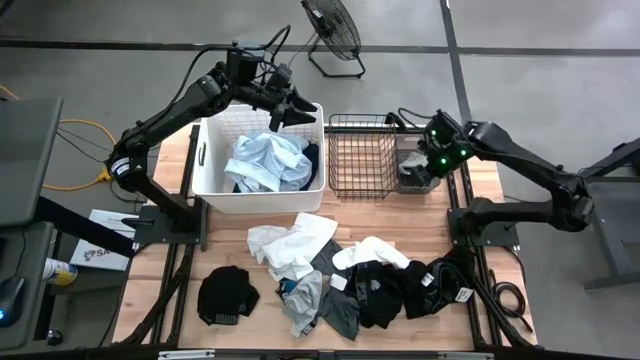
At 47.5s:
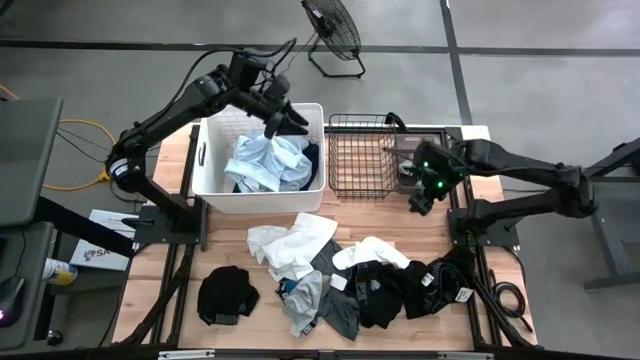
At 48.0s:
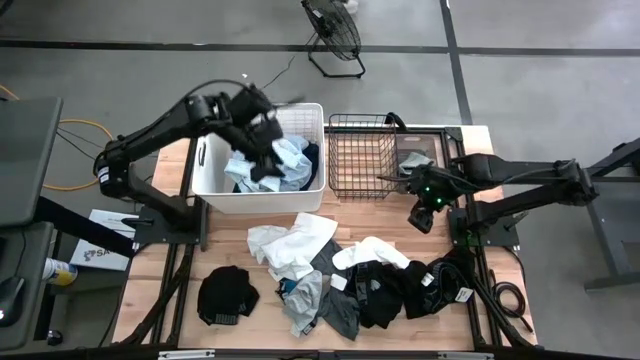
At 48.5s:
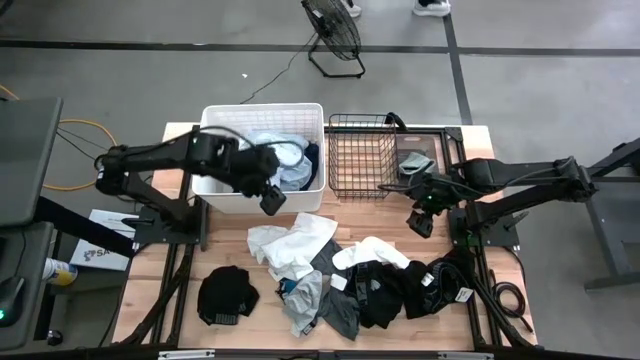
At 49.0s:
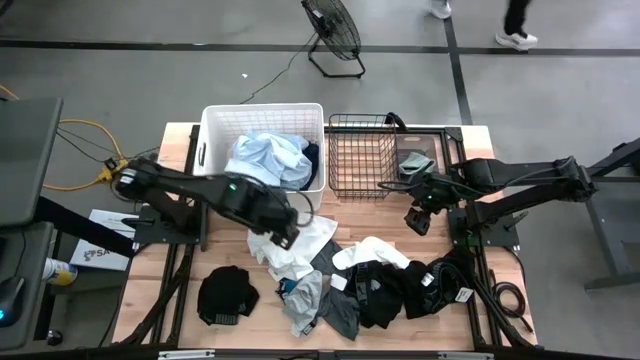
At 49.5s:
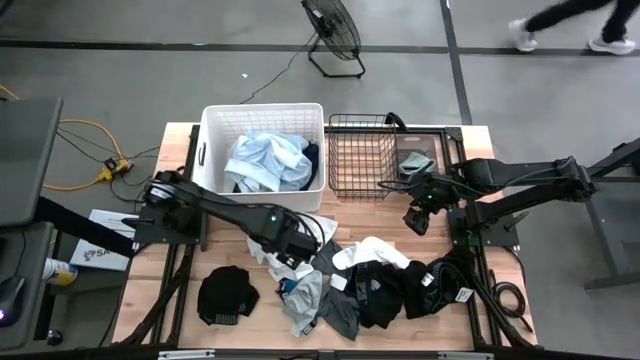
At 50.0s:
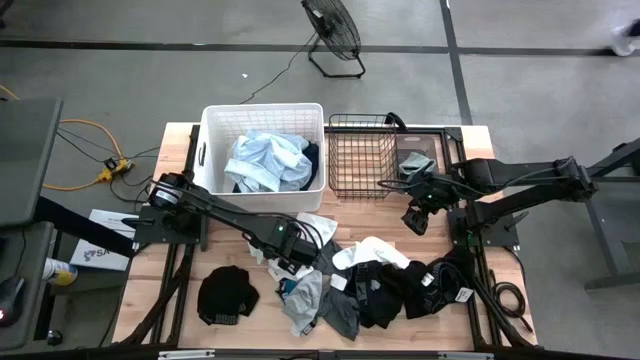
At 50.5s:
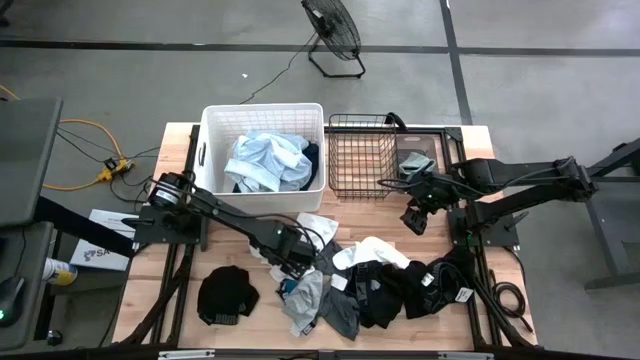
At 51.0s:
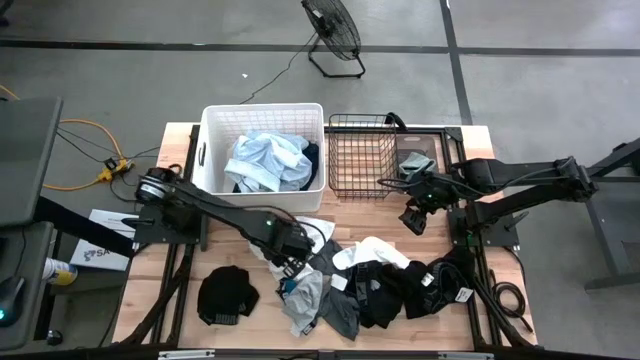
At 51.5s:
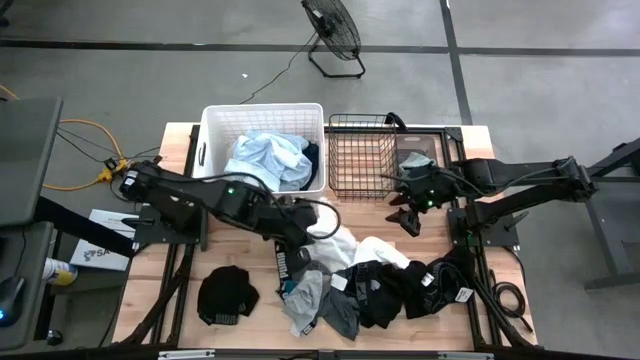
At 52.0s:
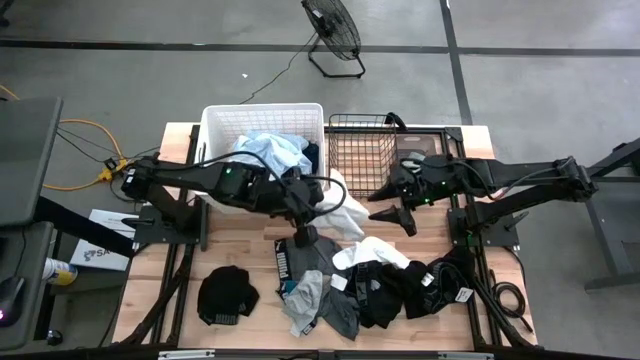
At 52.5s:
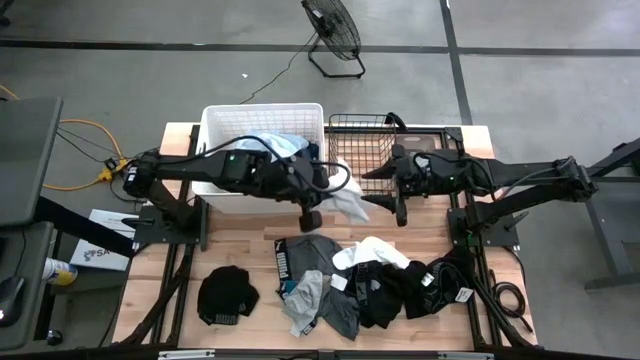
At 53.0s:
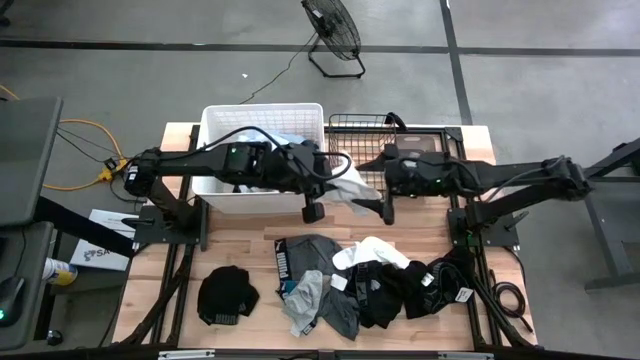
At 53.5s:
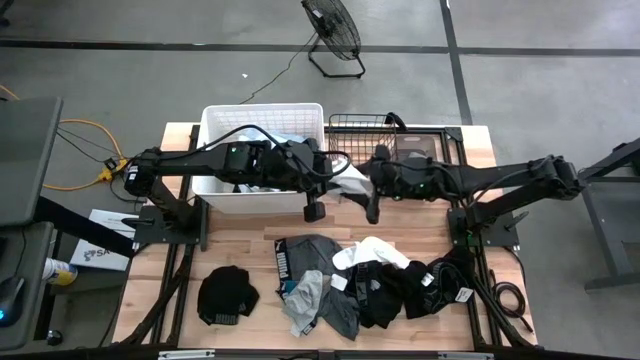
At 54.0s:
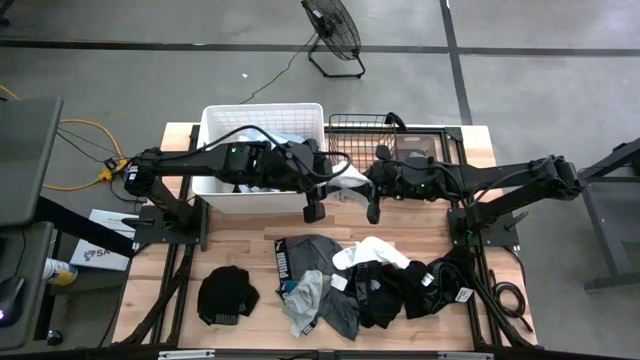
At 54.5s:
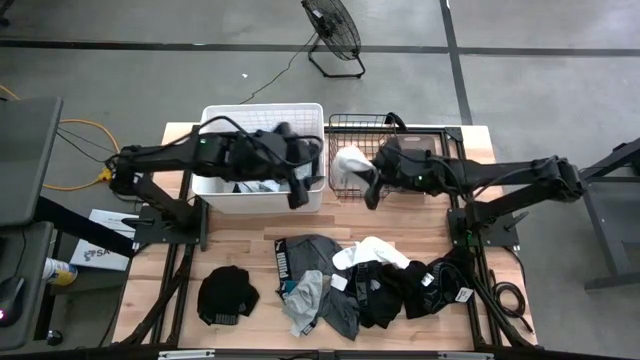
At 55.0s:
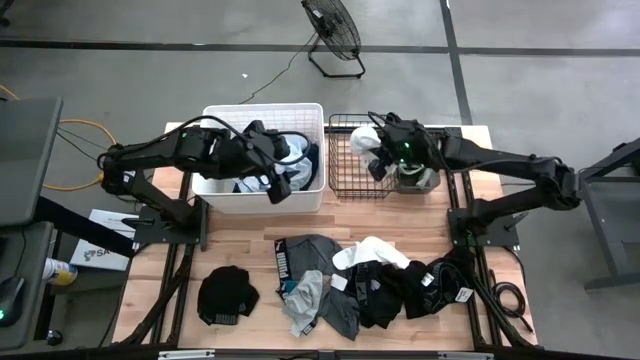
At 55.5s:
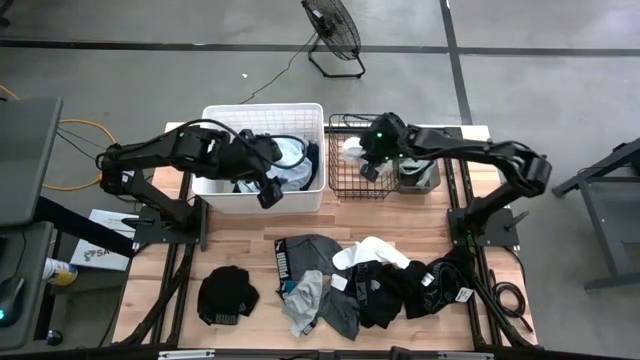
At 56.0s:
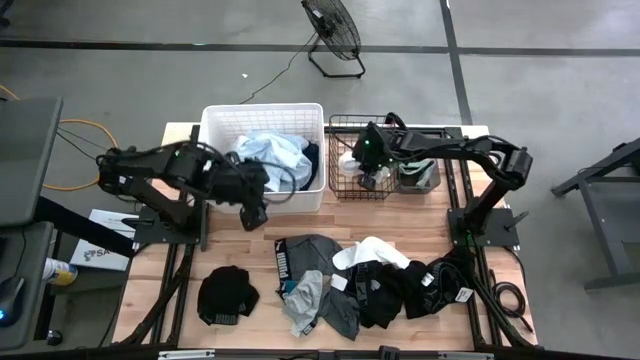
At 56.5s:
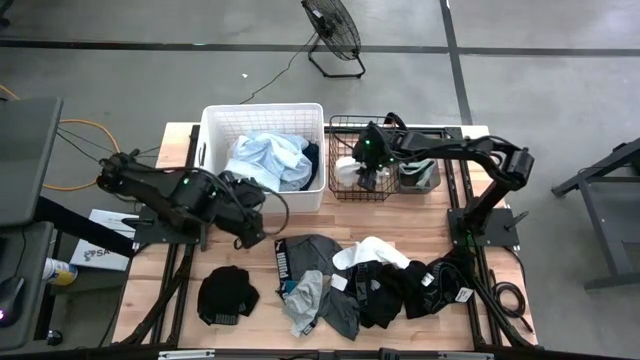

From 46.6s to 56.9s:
Task: Pick & Place Cloths
Put the white underwear into the black wire basket

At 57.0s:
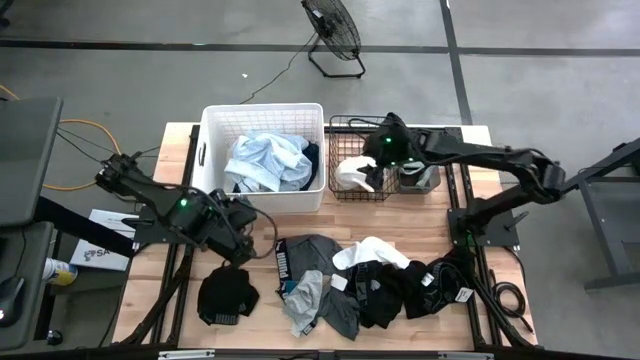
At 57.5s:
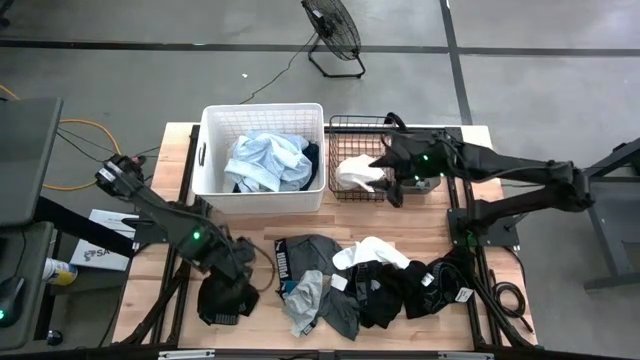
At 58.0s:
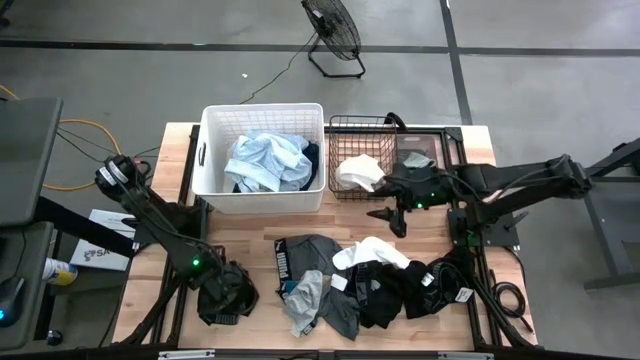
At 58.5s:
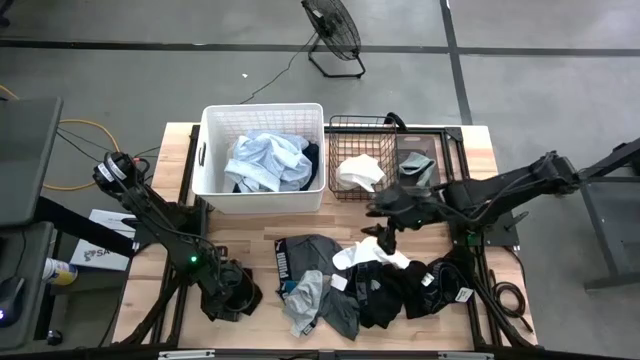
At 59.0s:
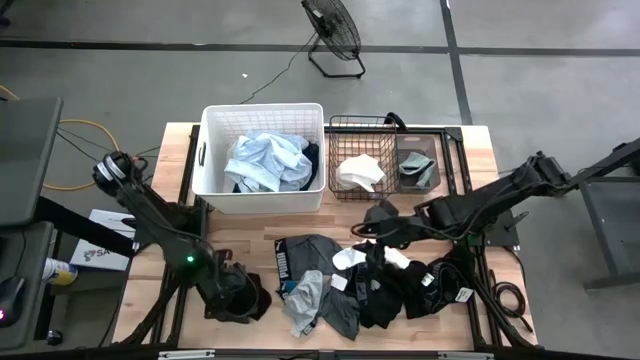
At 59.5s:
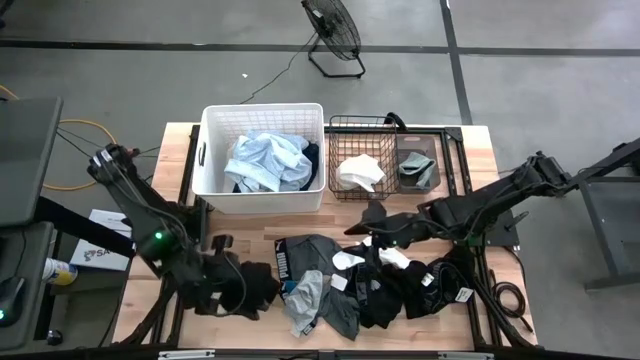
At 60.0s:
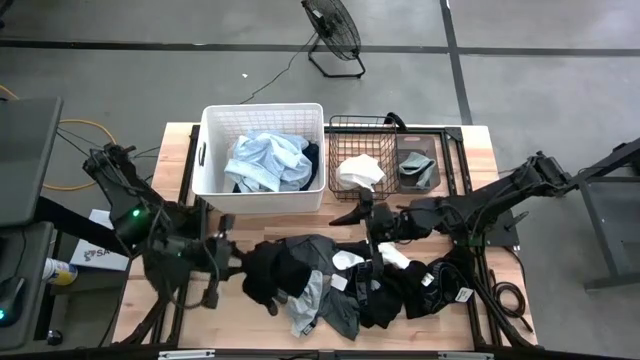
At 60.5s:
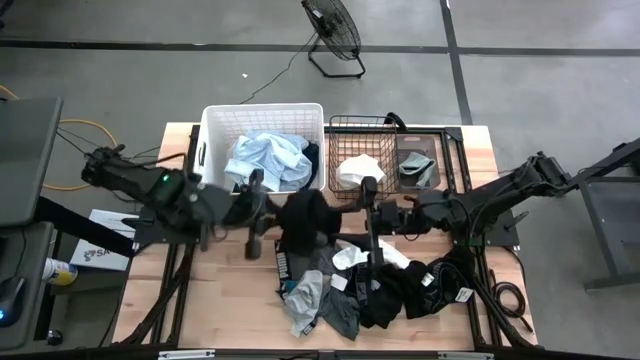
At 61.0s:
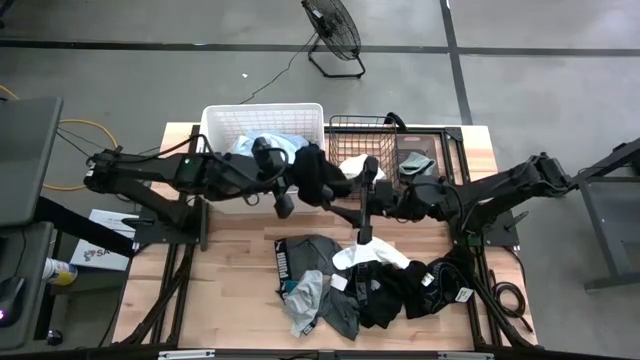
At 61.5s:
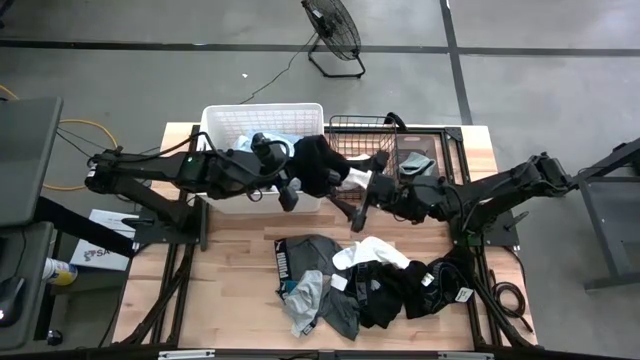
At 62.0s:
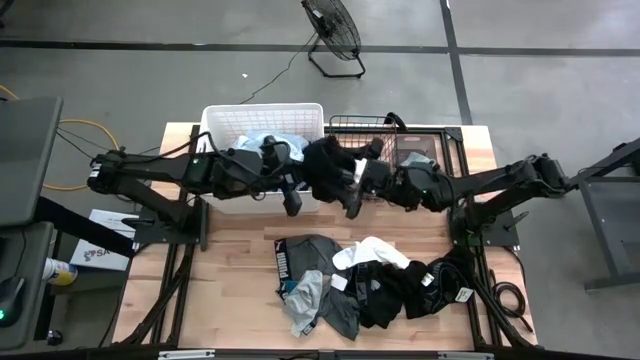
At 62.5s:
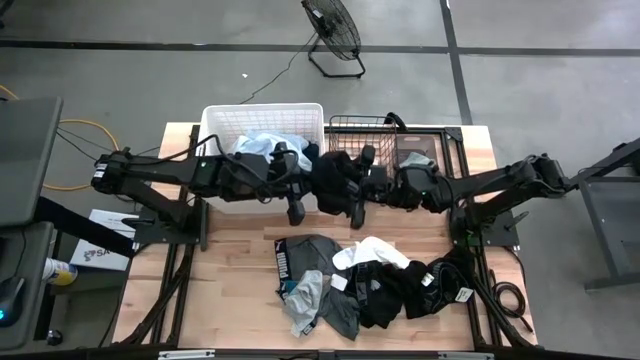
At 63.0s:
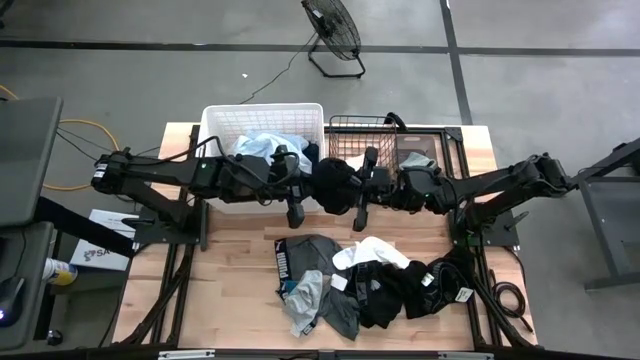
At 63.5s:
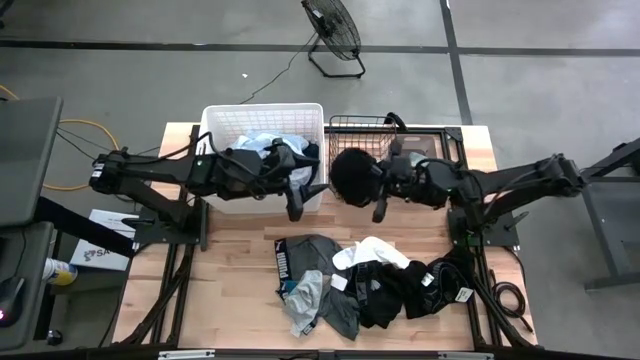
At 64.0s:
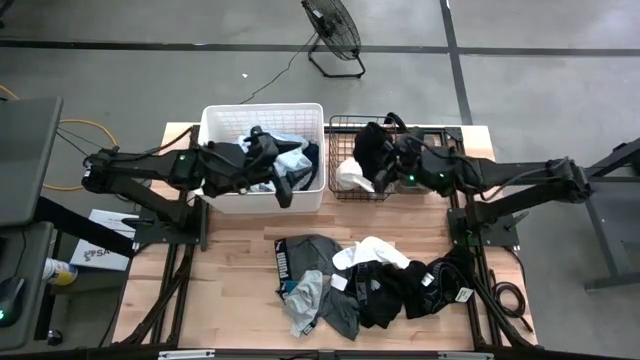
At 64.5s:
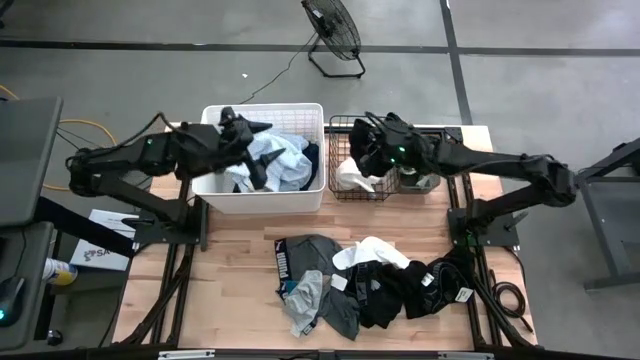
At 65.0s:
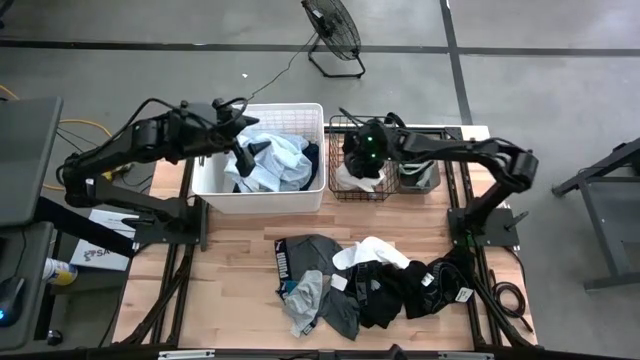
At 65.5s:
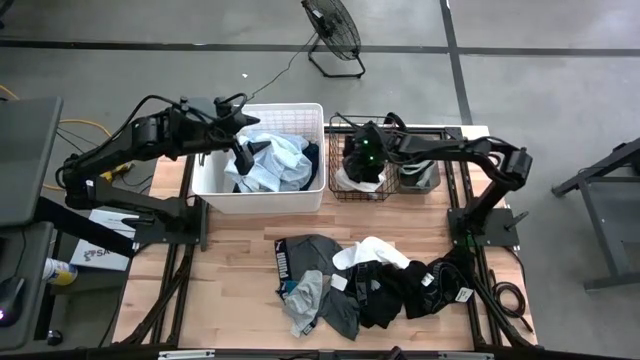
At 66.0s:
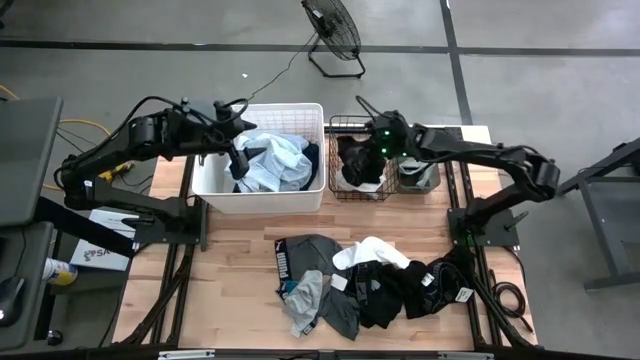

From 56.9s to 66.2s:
Put the left black underwear into the black wire basket

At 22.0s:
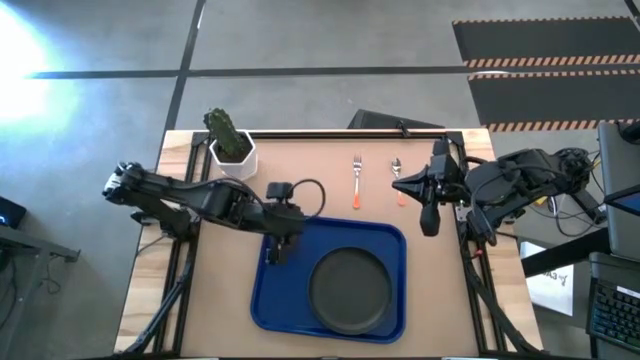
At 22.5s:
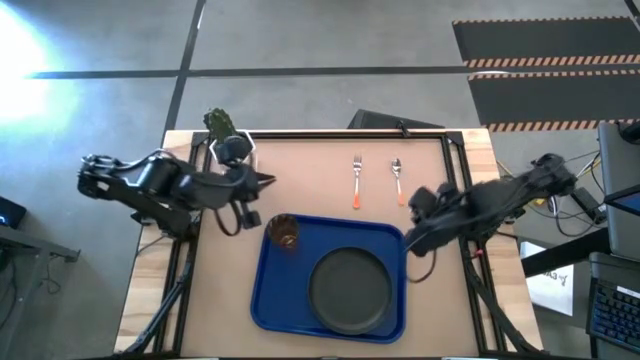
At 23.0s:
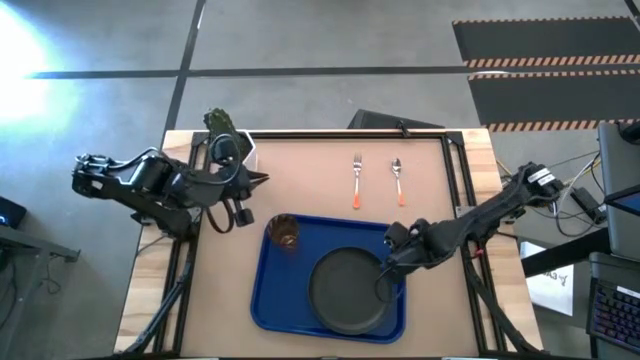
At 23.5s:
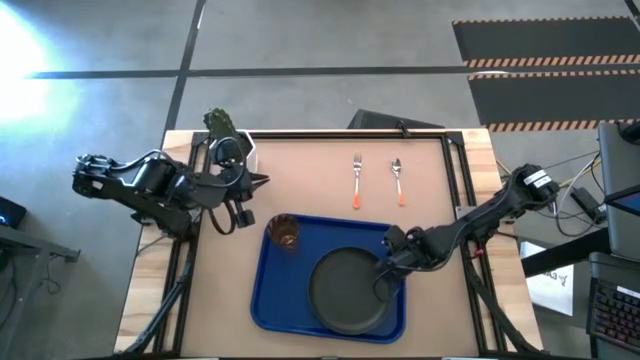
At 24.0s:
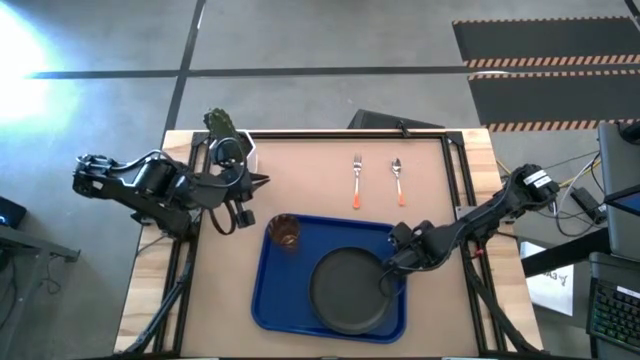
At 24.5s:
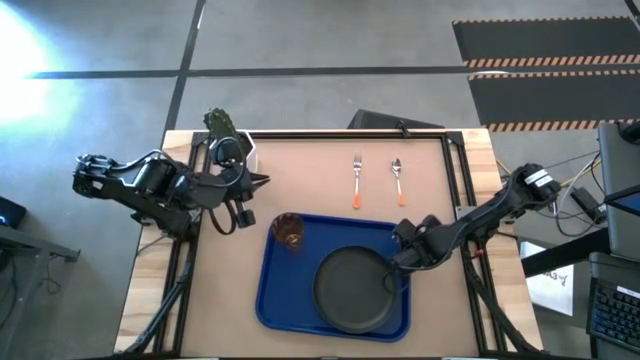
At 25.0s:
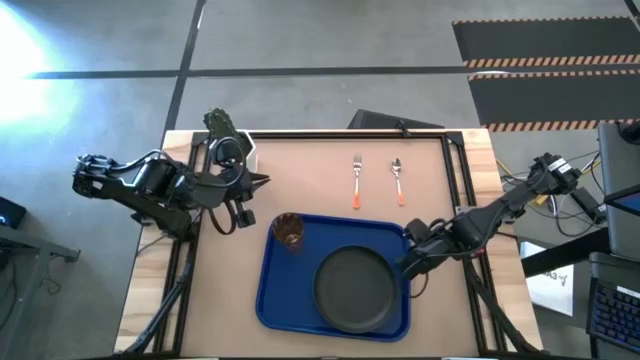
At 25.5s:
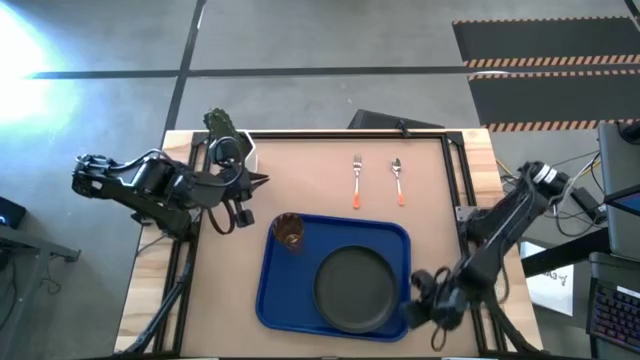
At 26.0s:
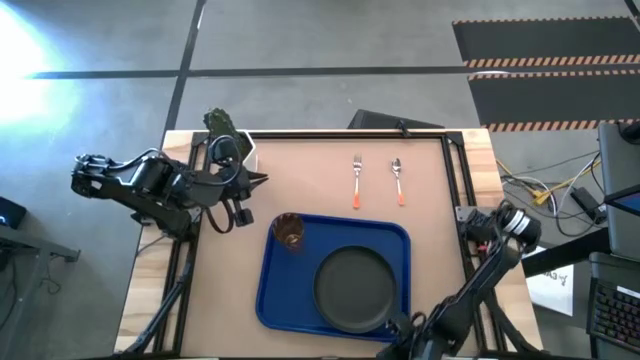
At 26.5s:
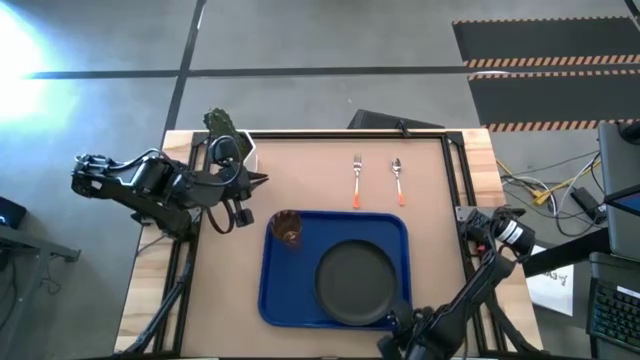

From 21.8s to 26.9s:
Task: Pick and place plate/cup/fork/spoon on tray
Adjust the blue serving tray
